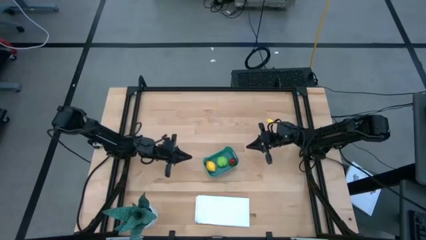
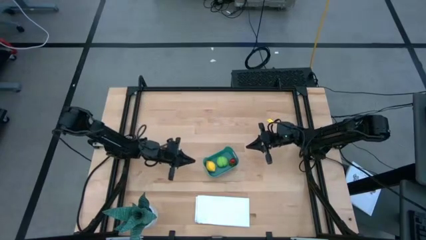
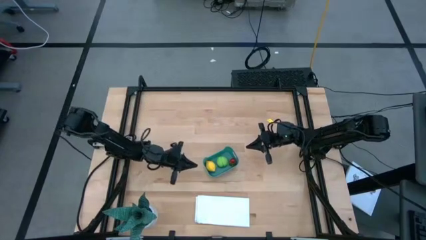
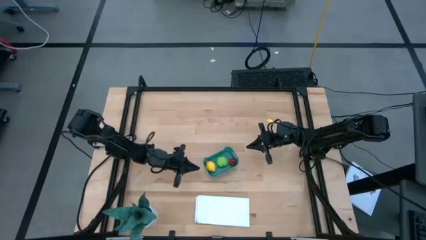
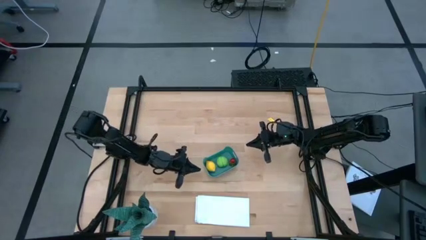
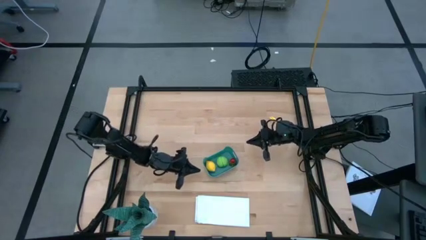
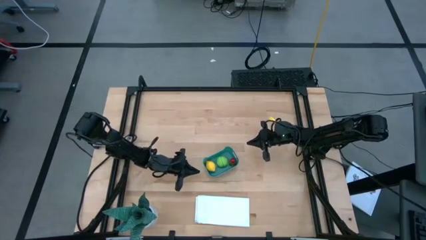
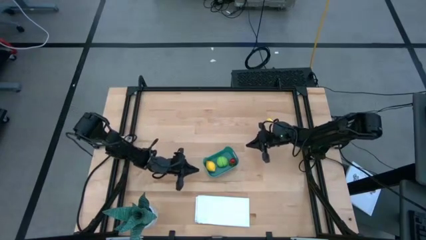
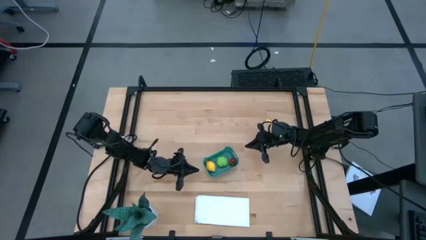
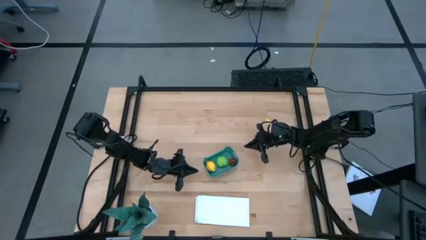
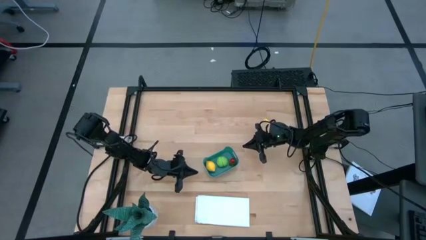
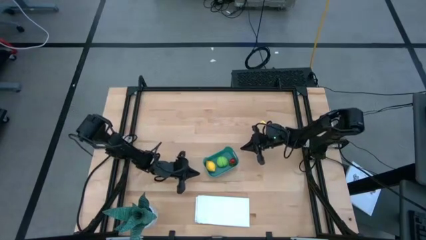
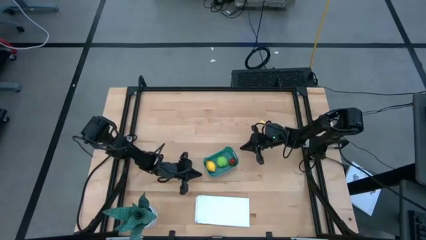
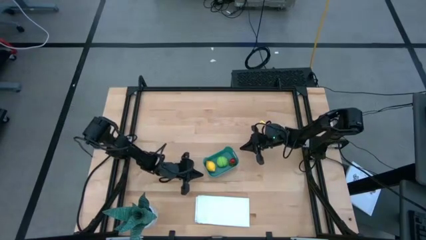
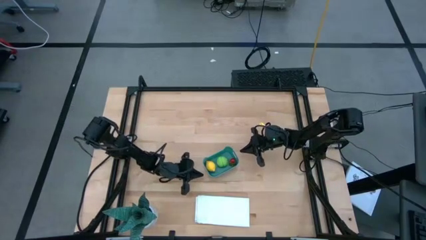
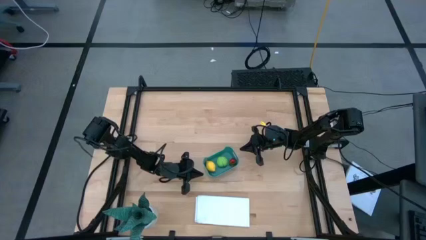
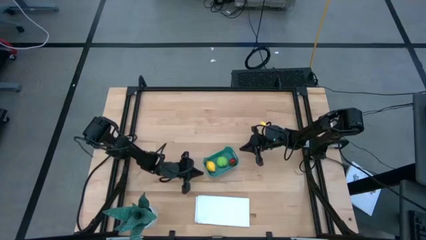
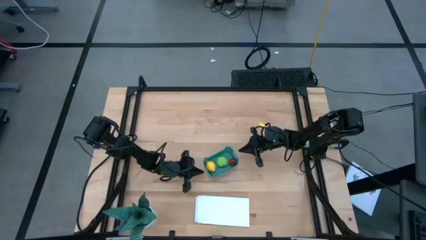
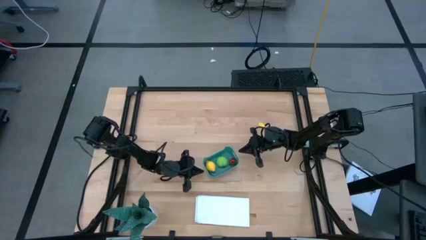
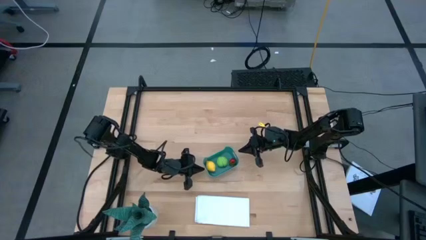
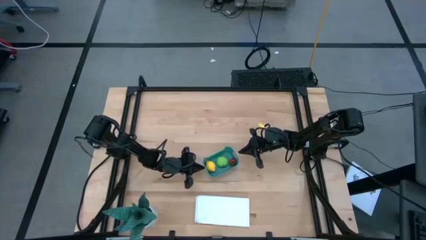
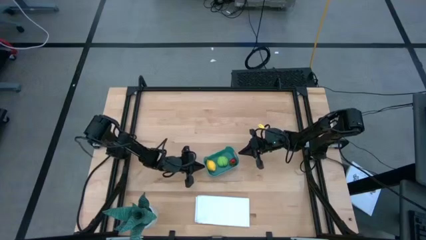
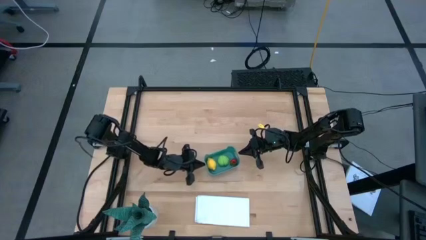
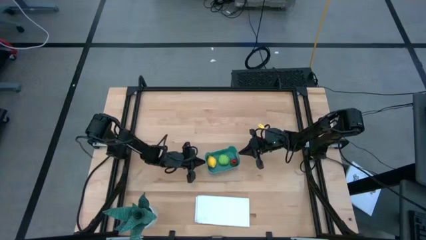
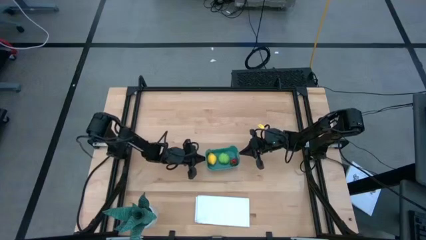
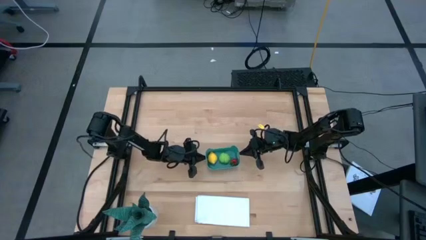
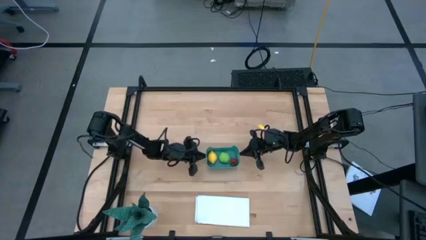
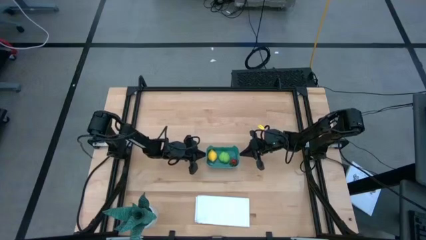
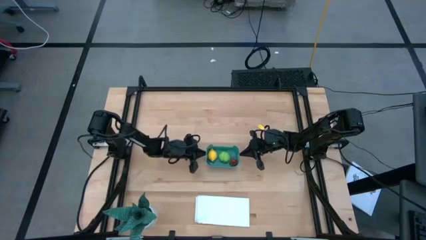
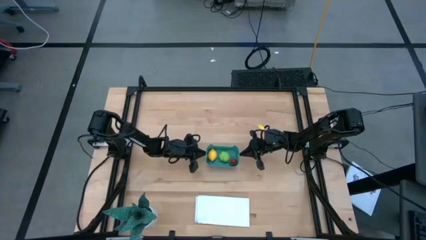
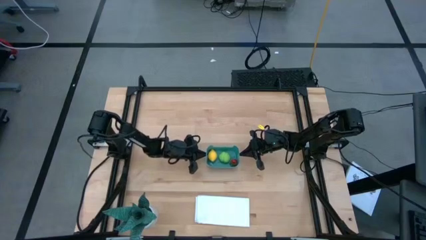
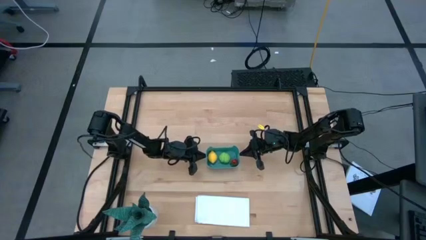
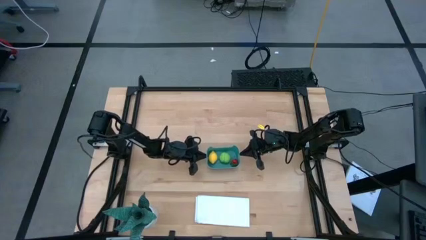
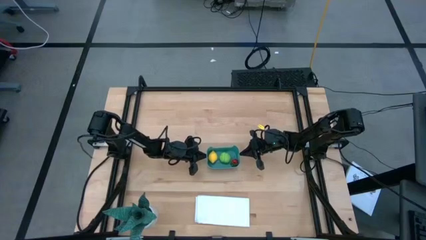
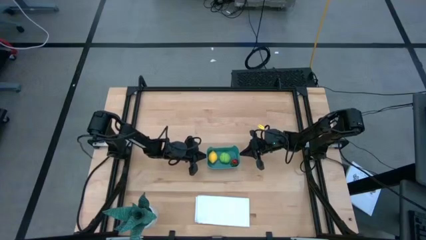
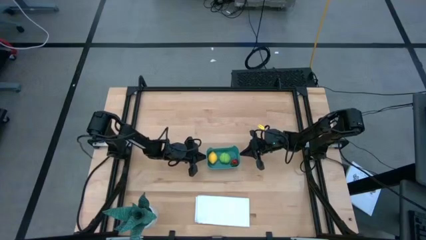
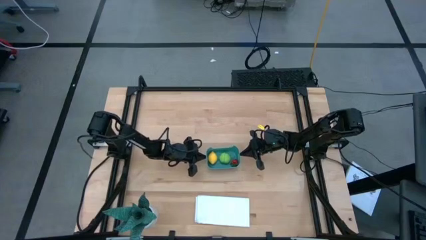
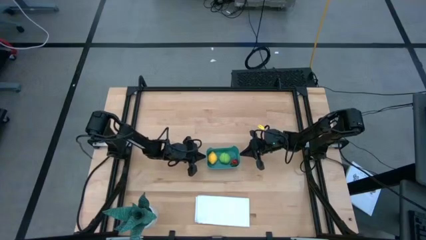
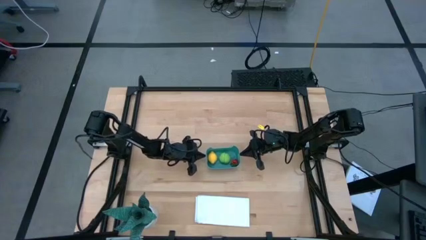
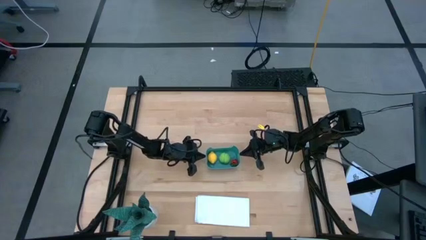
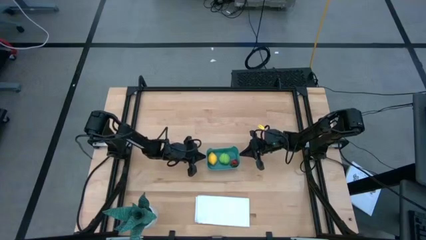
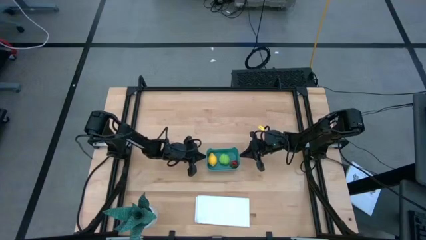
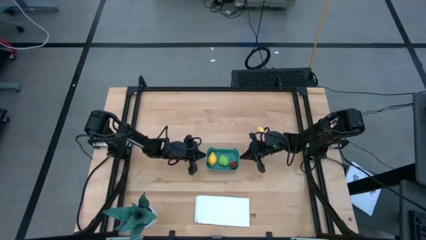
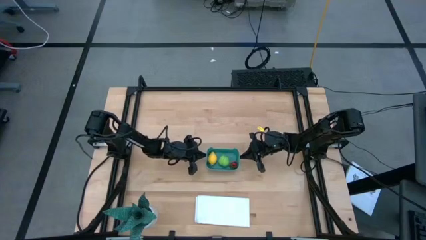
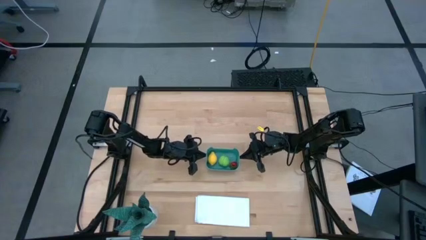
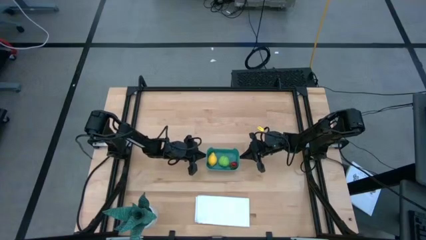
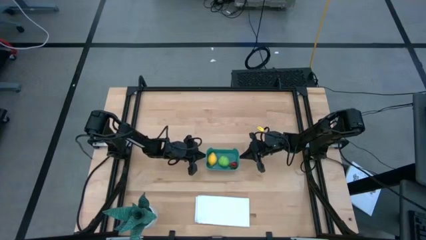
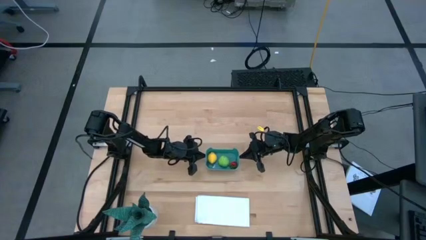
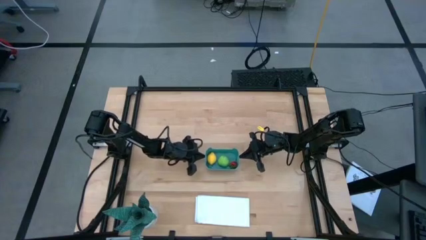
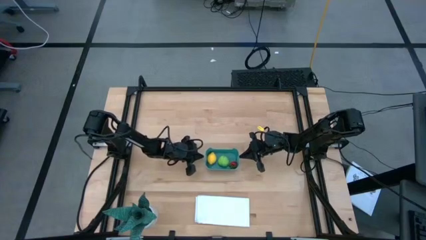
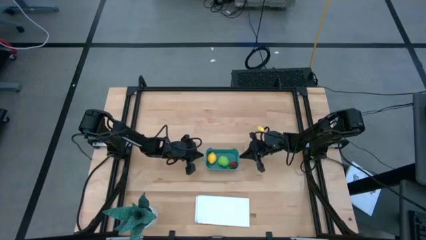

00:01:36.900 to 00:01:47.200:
Task: Pick and placing Produce into tupperware
Adjust the green bin
